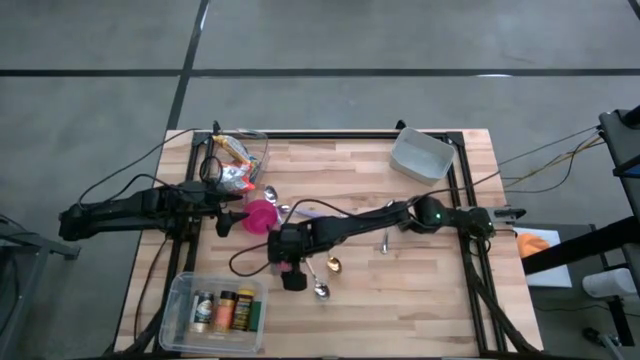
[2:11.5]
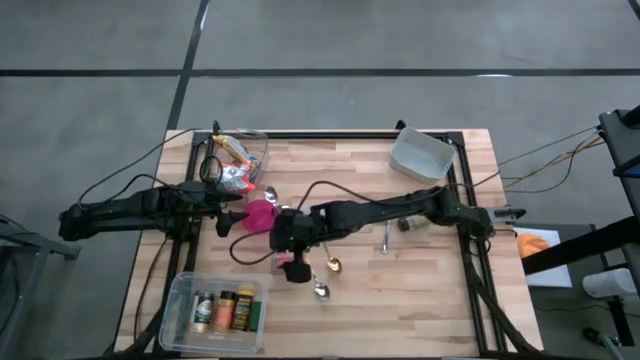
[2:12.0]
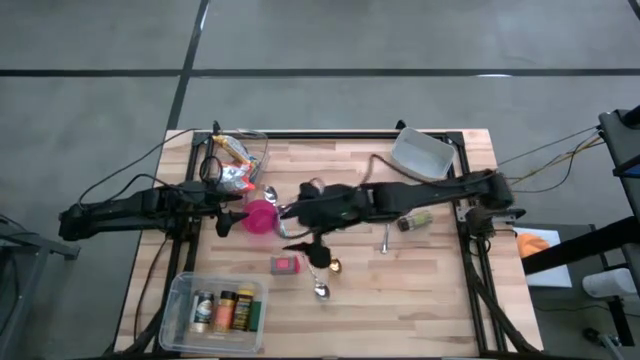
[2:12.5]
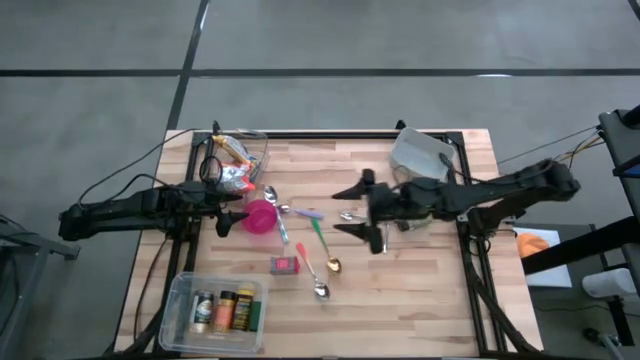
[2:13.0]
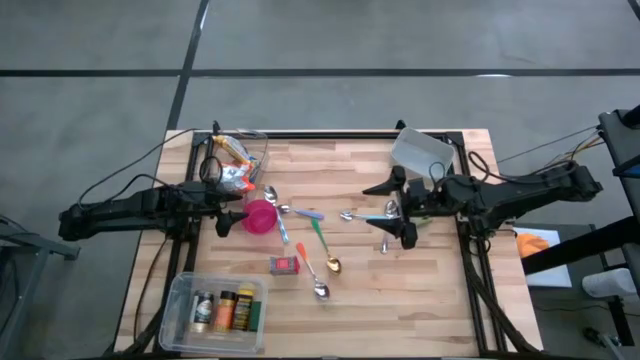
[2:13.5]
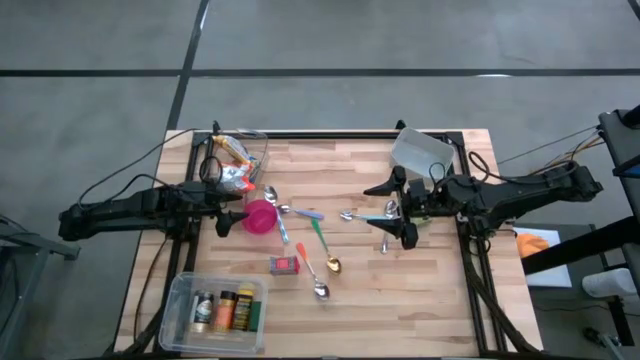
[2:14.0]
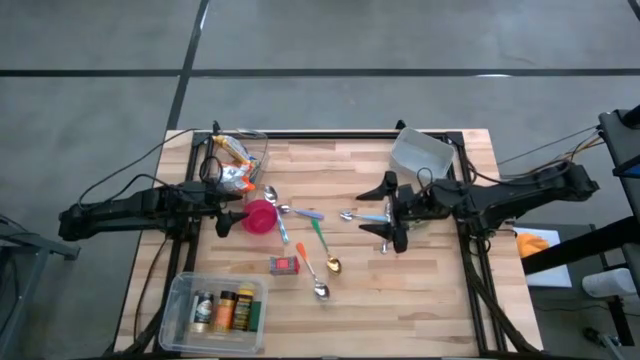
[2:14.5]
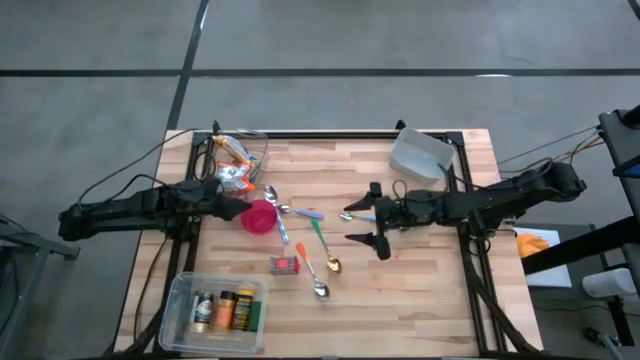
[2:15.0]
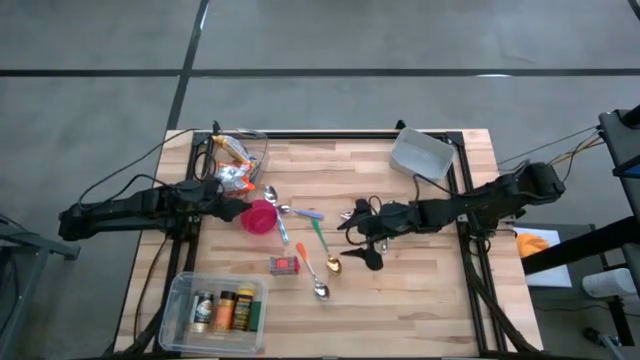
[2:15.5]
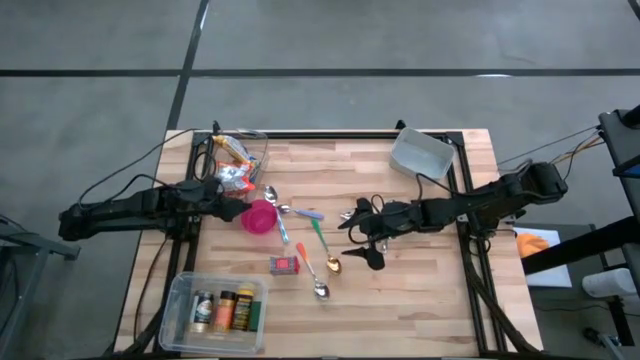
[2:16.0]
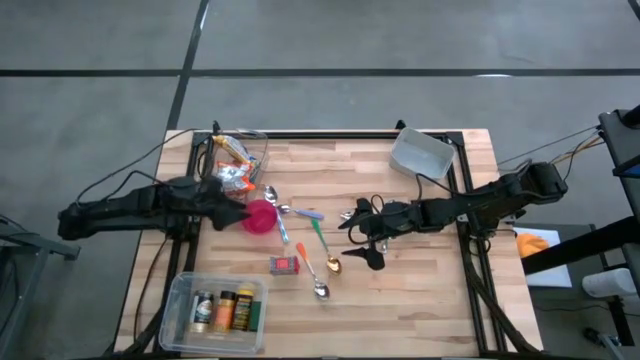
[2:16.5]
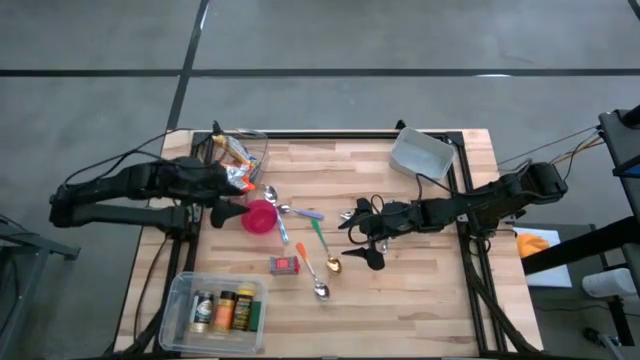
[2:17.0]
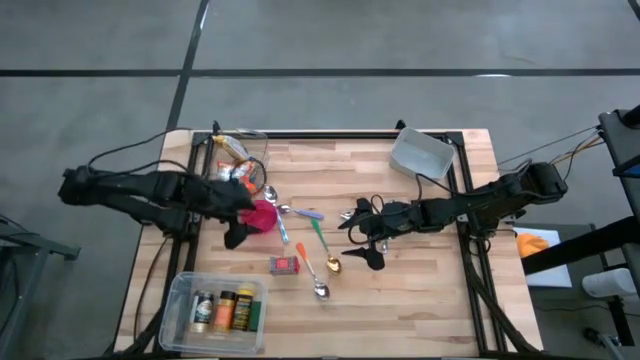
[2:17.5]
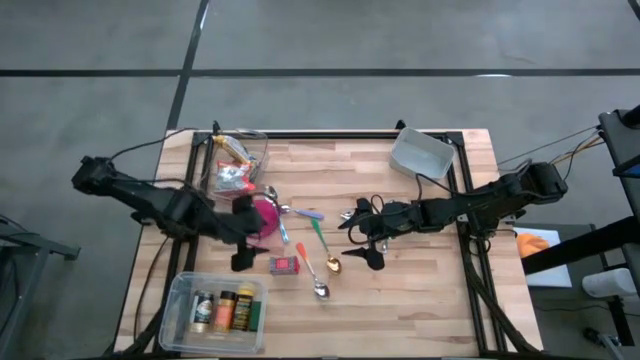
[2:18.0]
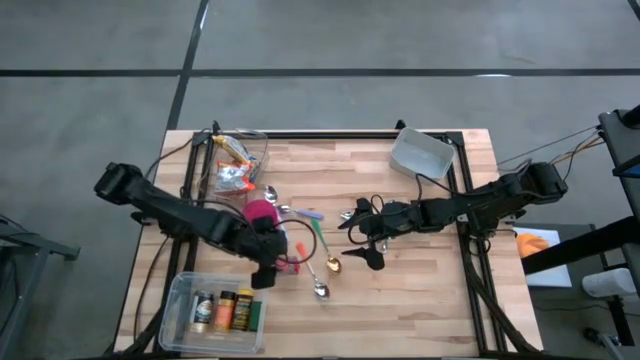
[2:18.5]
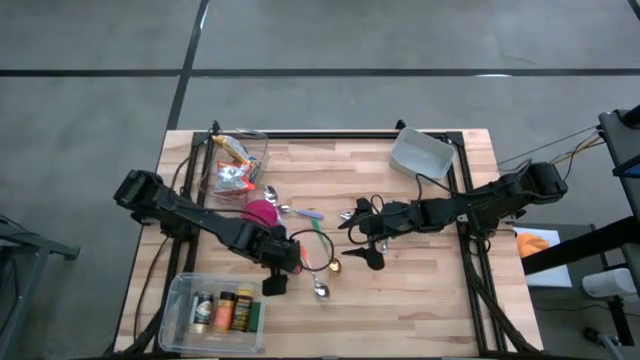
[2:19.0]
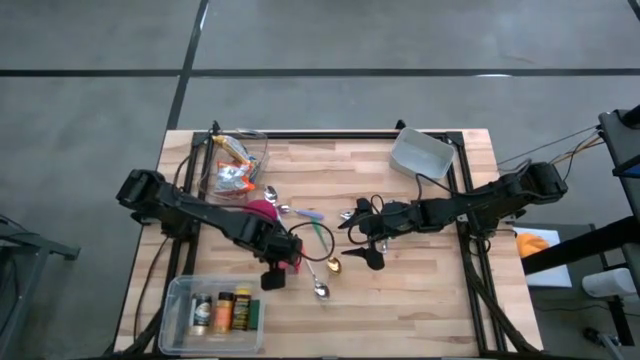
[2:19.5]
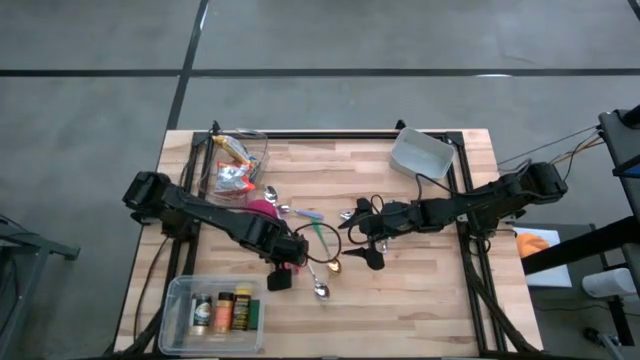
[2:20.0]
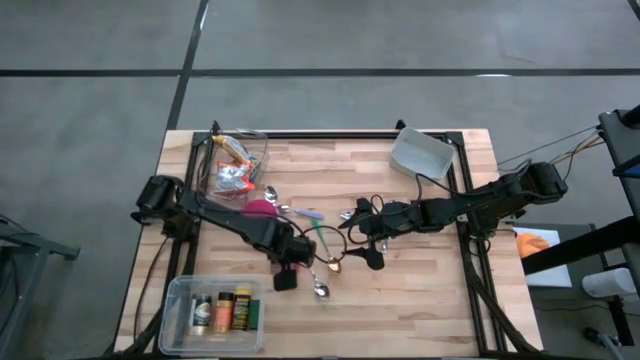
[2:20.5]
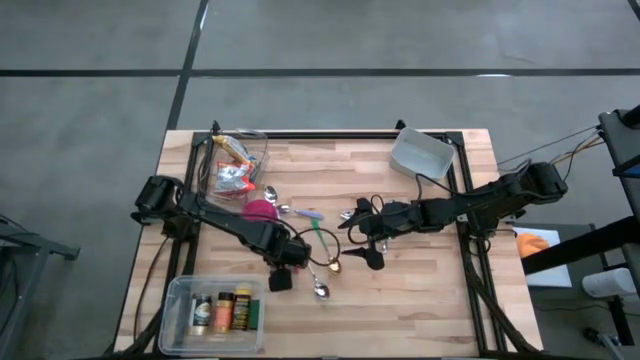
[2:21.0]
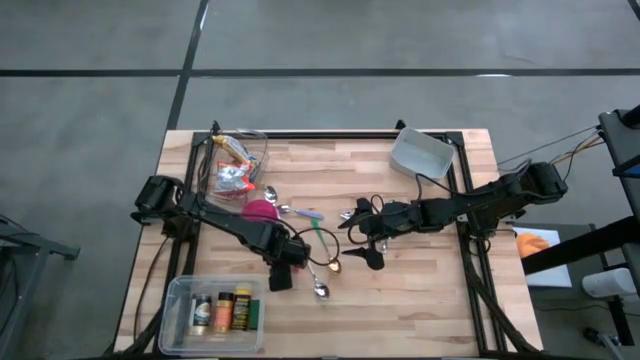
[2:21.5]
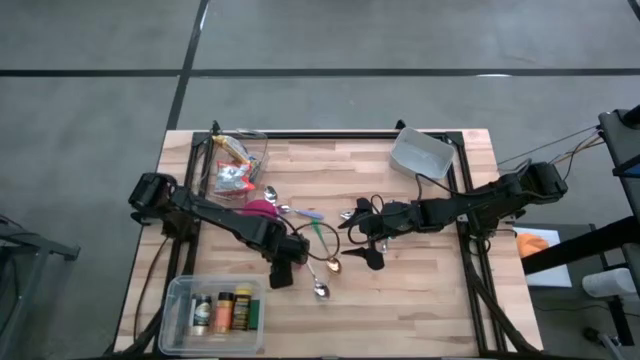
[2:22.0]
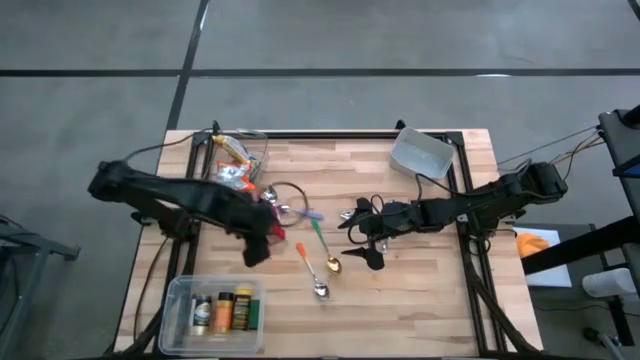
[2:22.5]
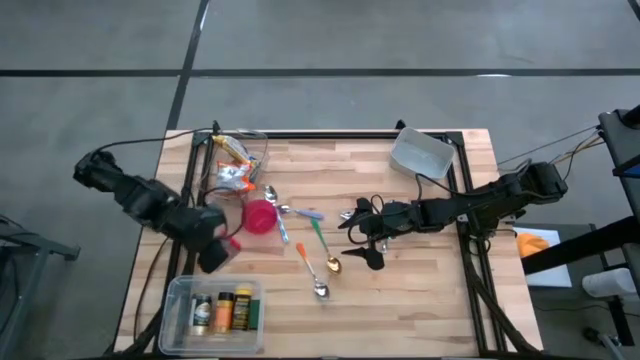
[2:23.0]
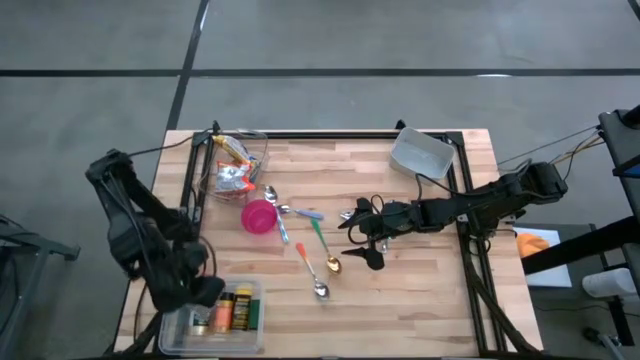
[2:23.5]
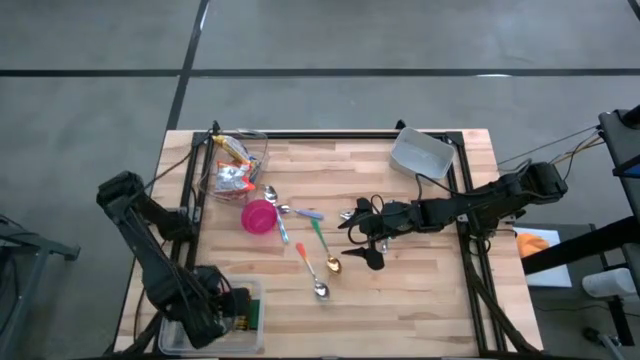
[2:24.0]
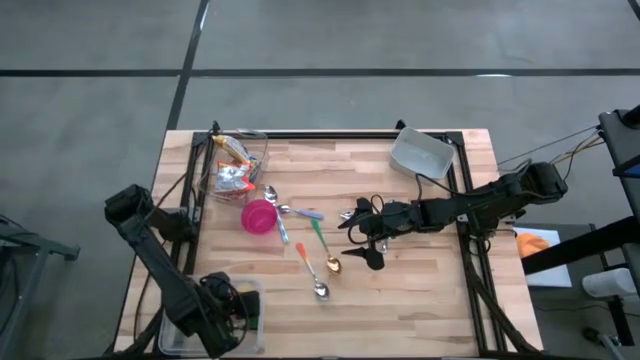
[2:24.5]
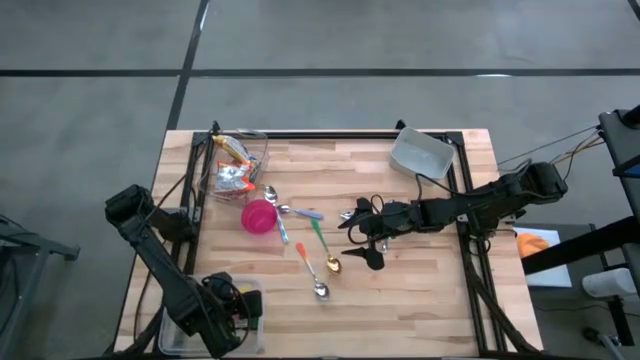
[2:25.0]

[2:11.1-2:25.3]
Put the red seasoning can into the white bin
